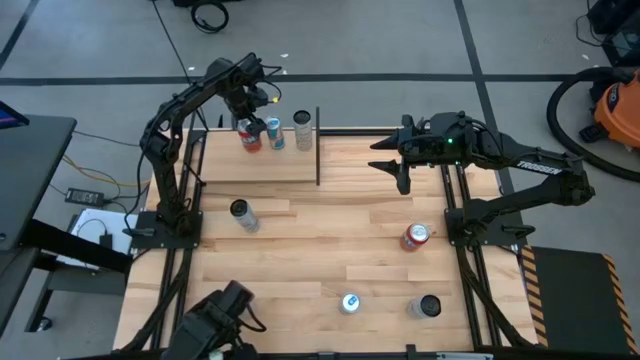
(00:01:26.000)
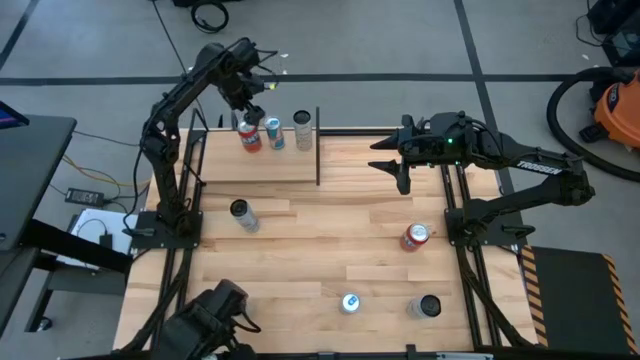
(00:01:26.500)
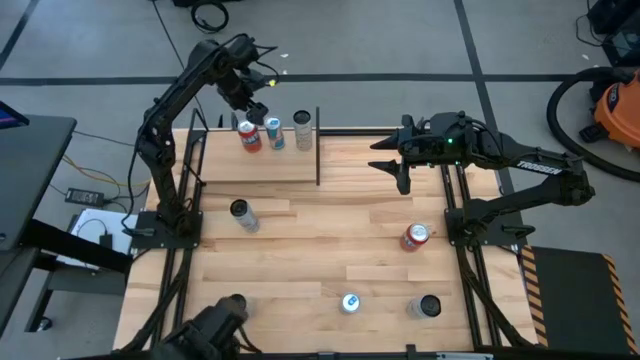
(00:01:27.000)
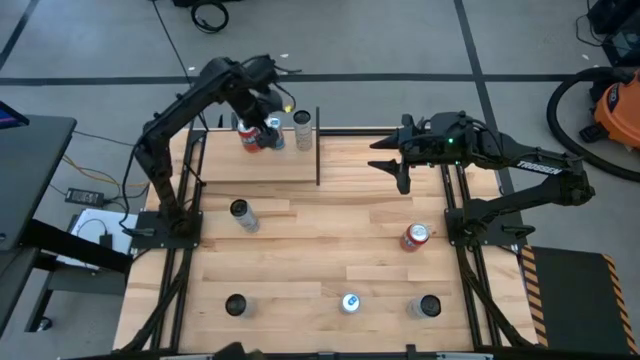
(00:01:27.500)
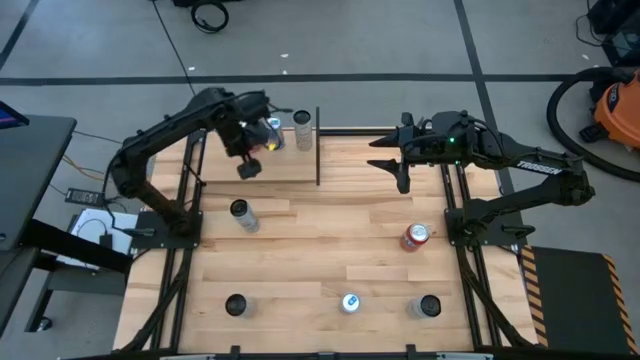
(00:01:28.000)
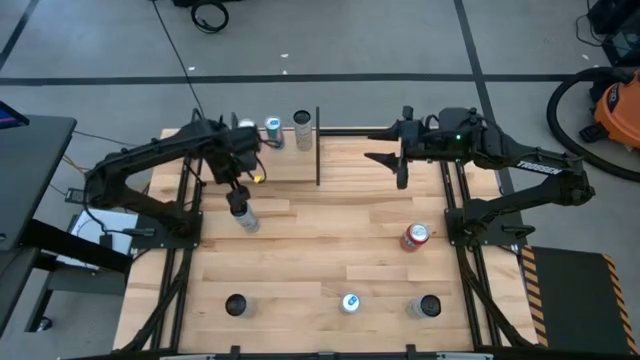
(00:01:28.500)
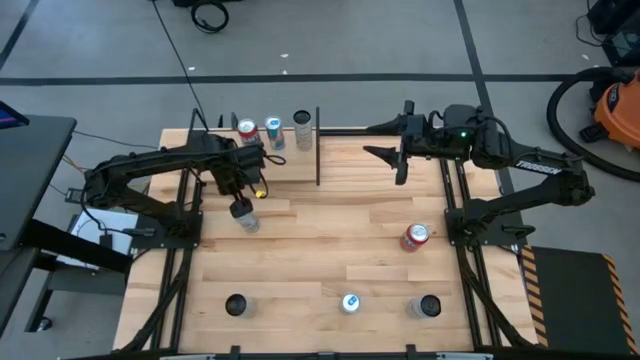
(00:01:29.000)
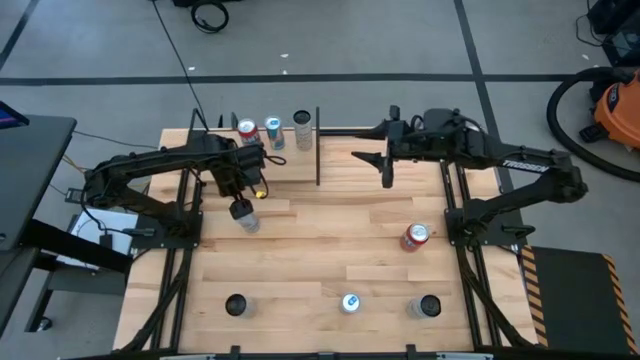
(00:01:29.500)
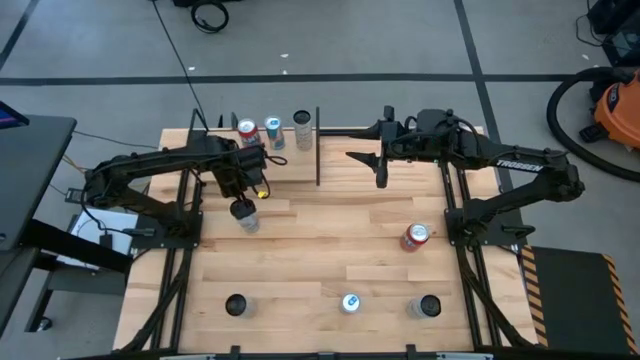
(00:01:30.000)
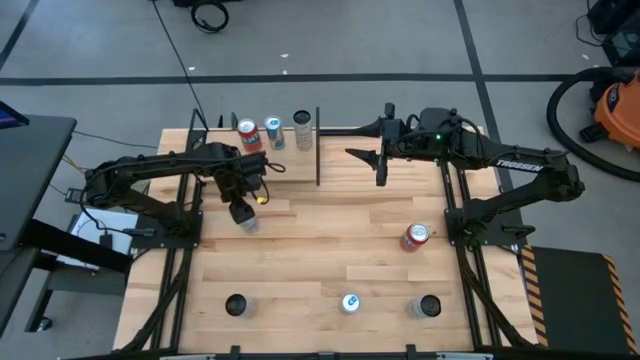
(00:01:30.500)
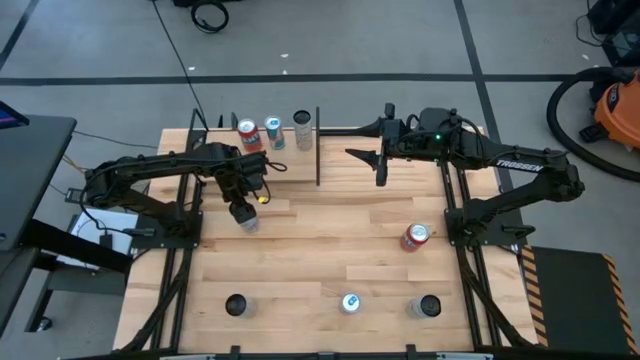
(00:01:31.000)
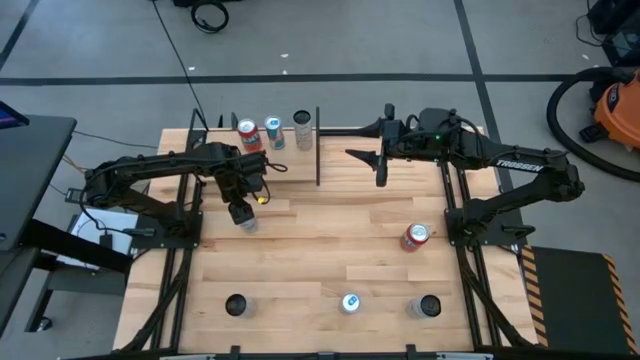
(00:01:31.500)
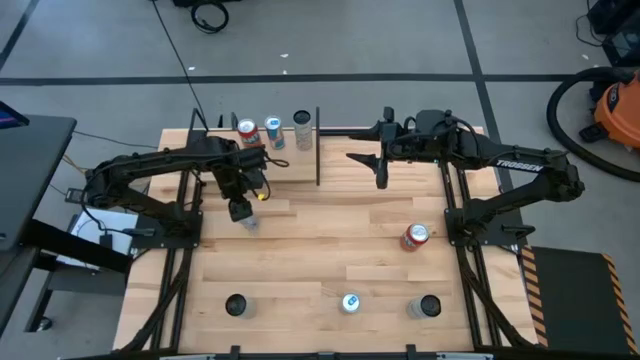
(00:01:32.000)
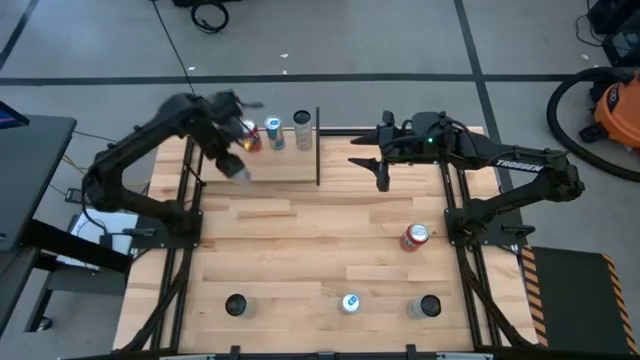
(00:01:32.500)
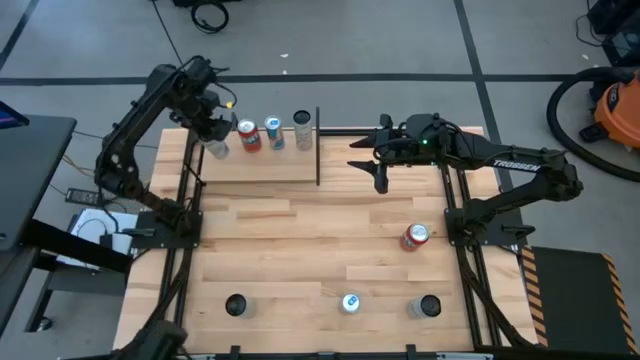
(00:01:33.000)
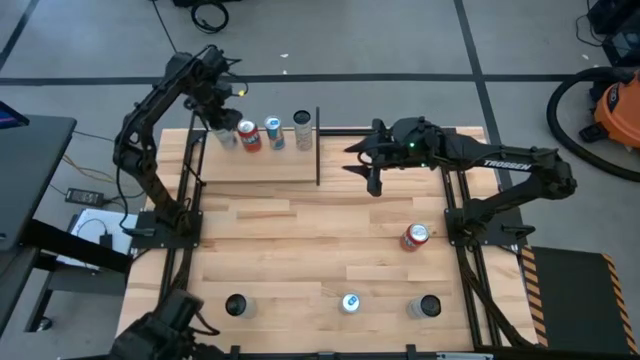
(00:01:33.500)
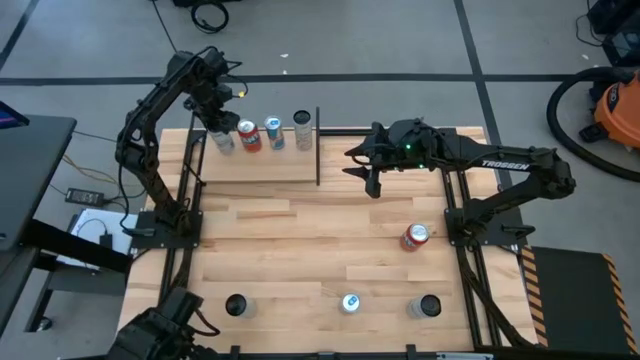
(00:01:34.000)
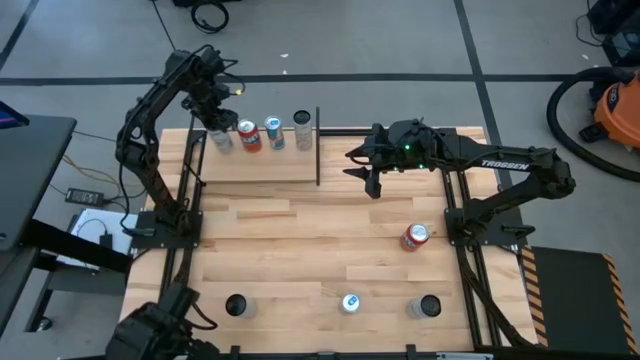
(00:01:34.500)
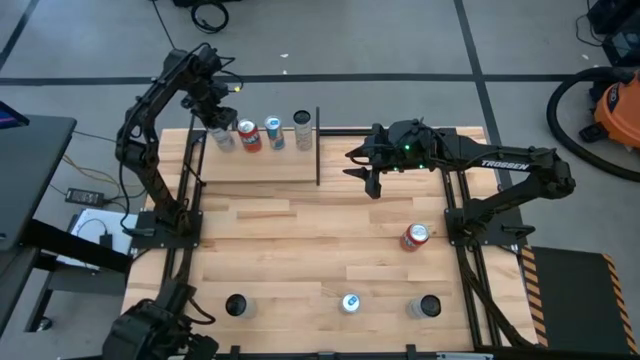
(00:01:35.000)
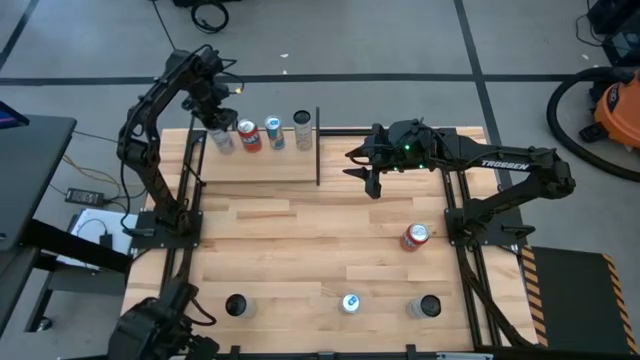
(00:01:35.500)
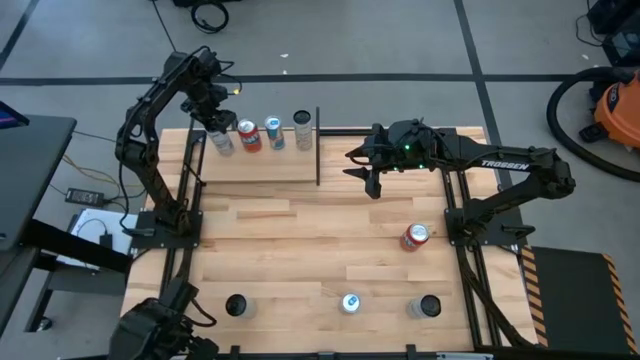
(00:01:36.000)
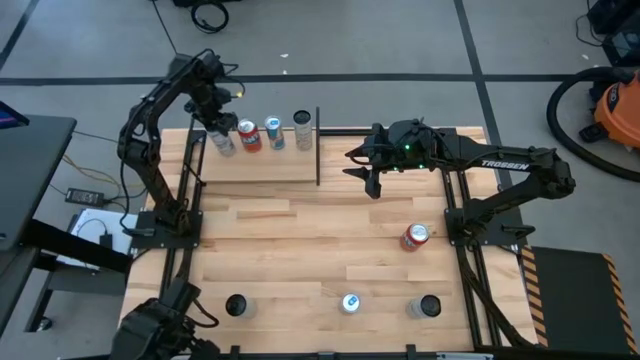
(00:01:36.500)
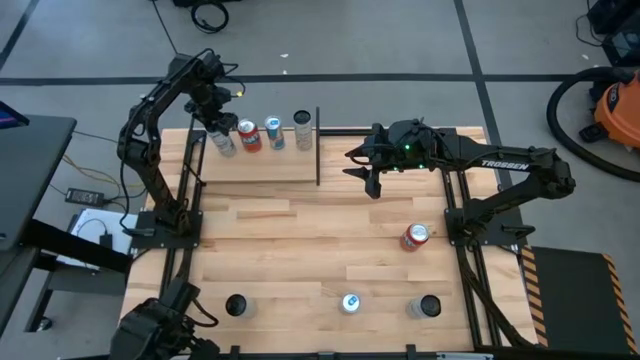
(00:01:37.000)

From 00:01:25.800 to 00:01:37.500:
Task: Place canned beverage on shelf
Put the white blue soda can on the shelf

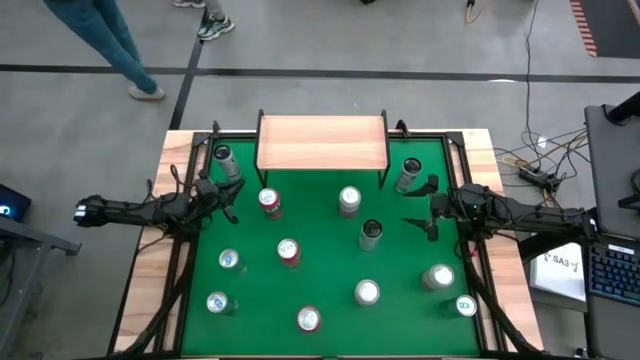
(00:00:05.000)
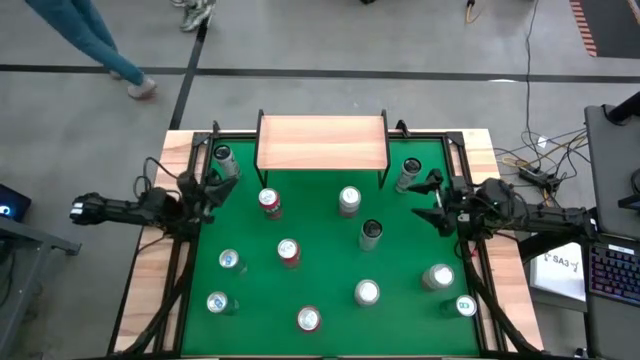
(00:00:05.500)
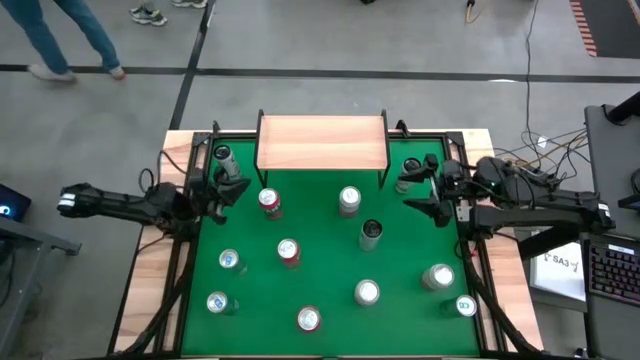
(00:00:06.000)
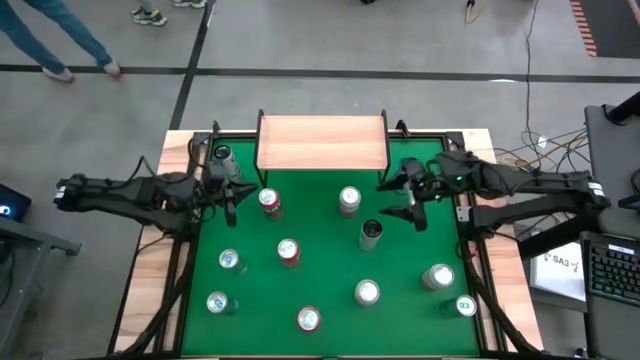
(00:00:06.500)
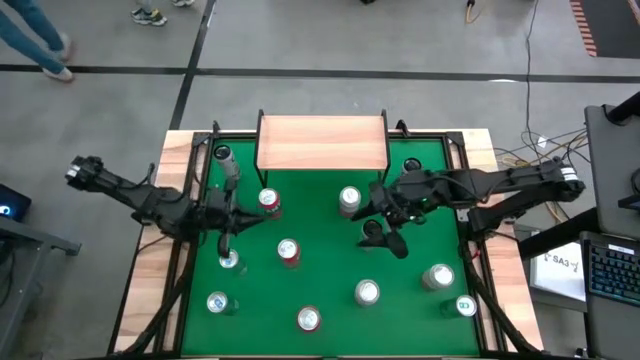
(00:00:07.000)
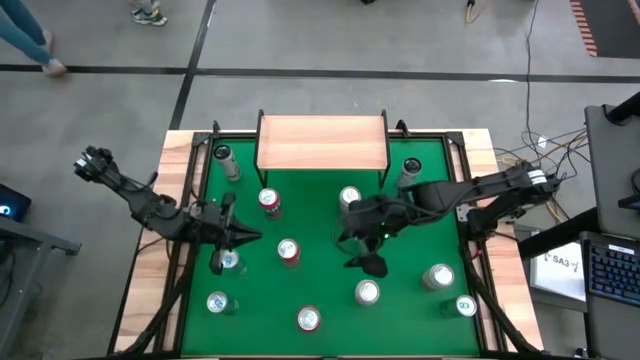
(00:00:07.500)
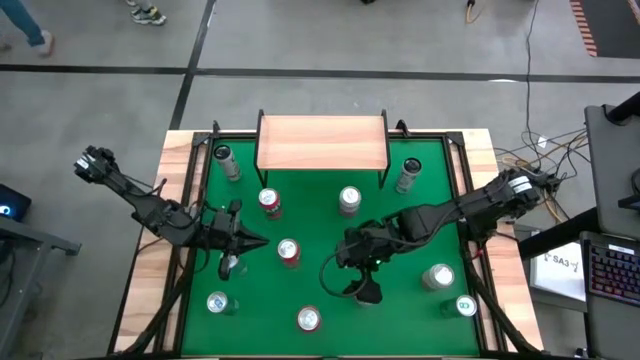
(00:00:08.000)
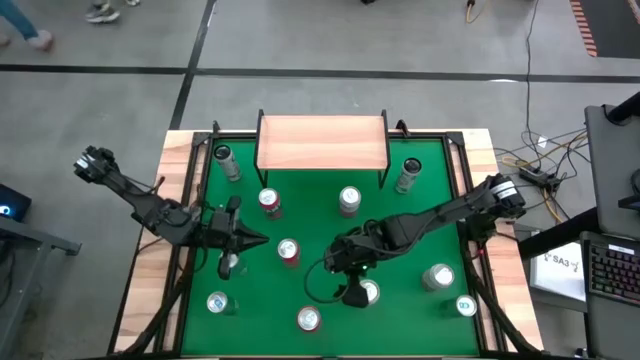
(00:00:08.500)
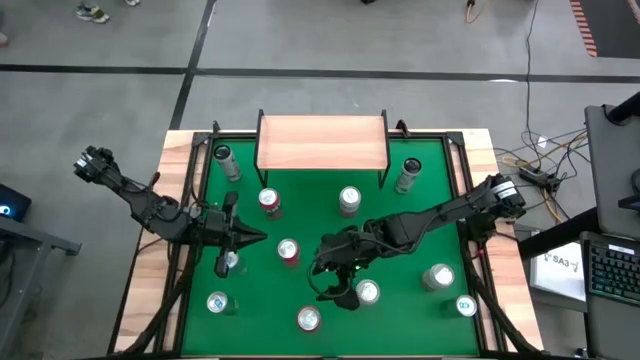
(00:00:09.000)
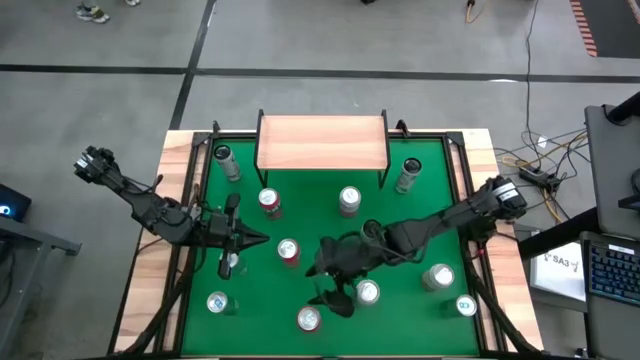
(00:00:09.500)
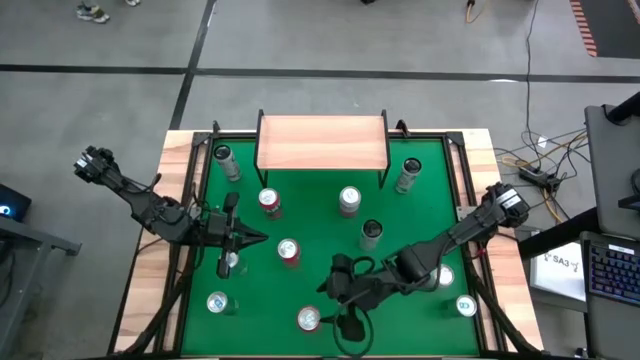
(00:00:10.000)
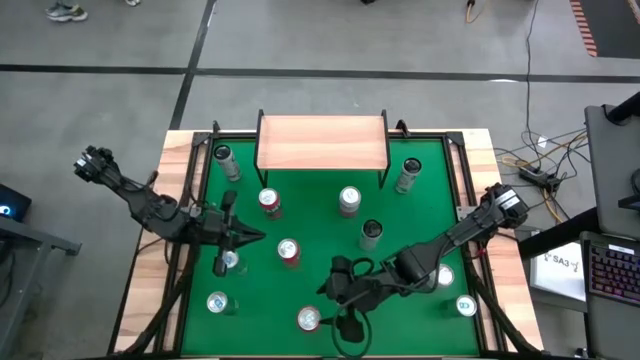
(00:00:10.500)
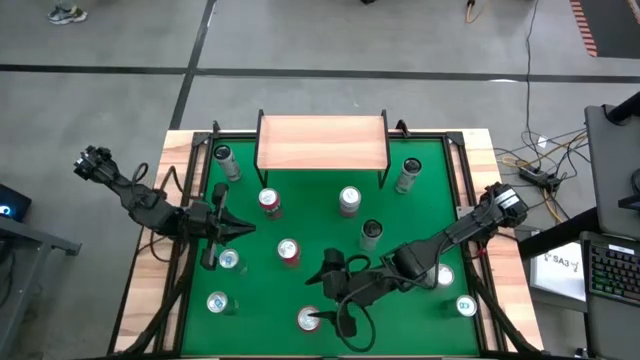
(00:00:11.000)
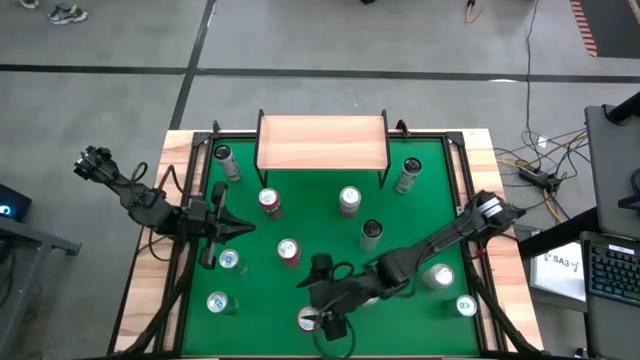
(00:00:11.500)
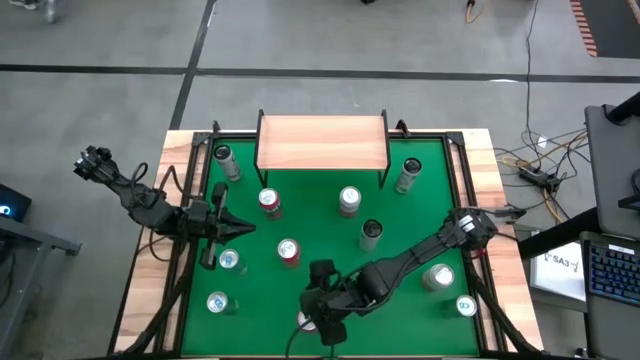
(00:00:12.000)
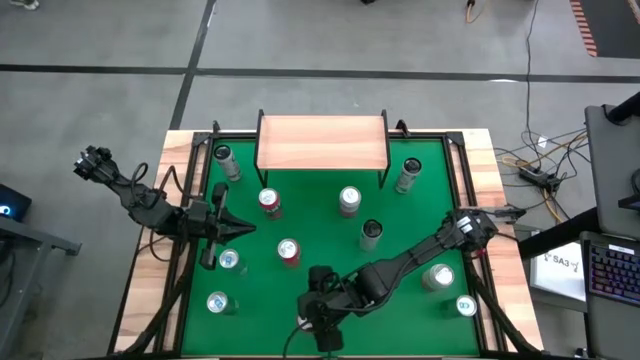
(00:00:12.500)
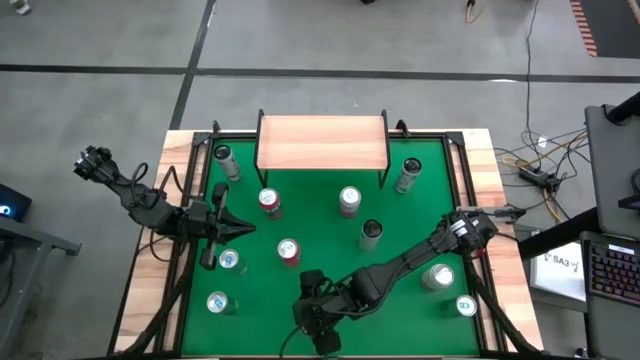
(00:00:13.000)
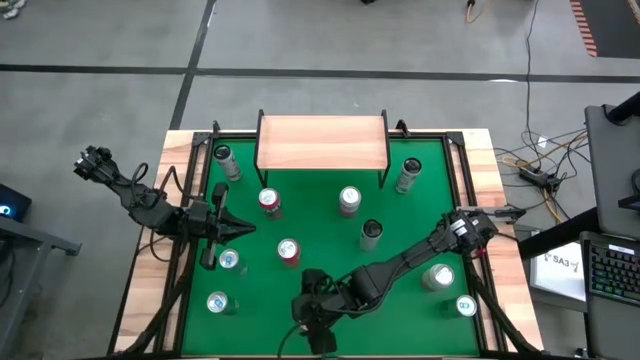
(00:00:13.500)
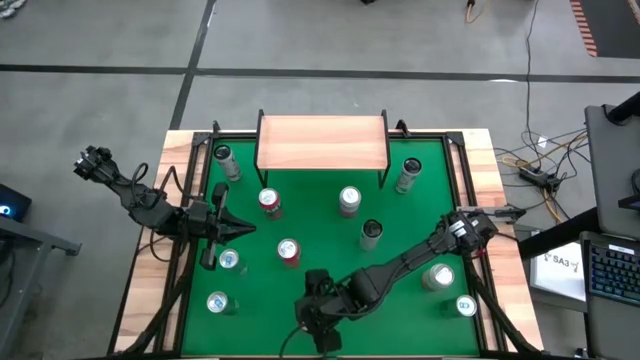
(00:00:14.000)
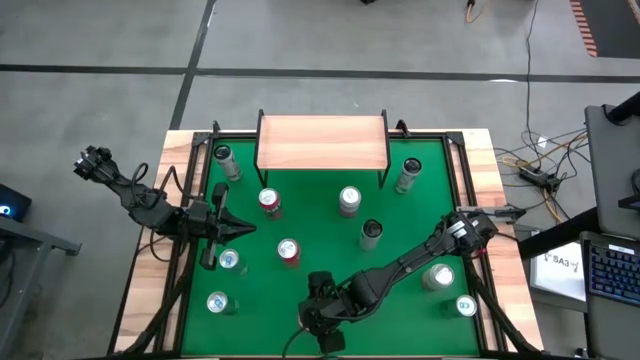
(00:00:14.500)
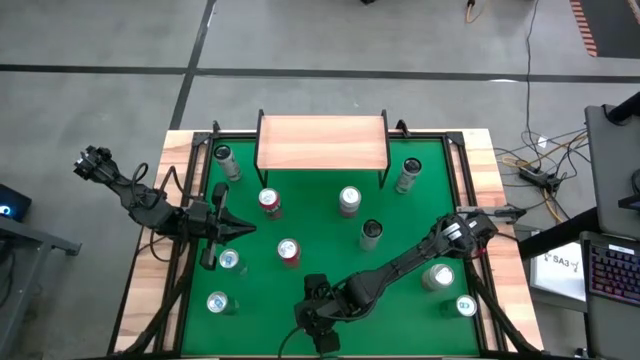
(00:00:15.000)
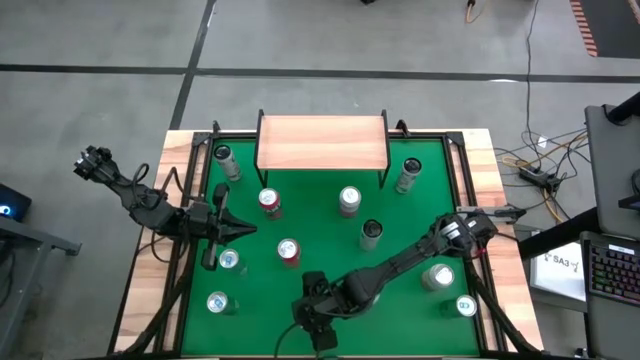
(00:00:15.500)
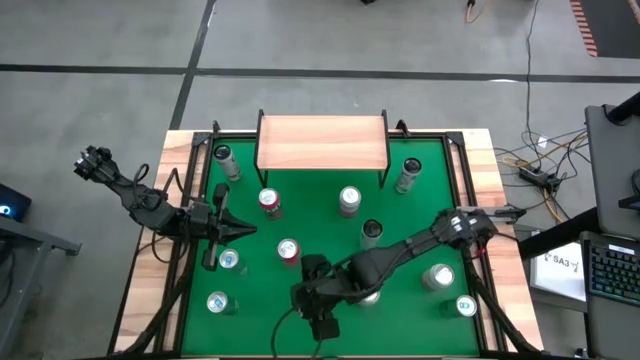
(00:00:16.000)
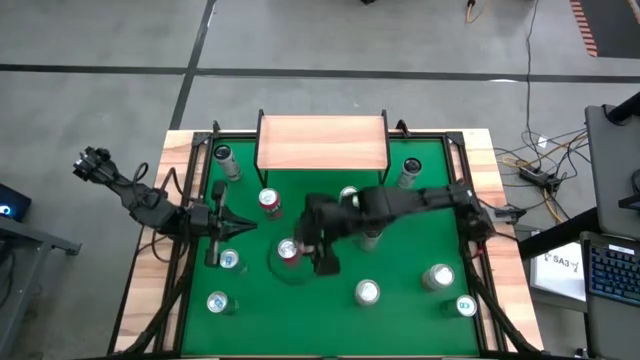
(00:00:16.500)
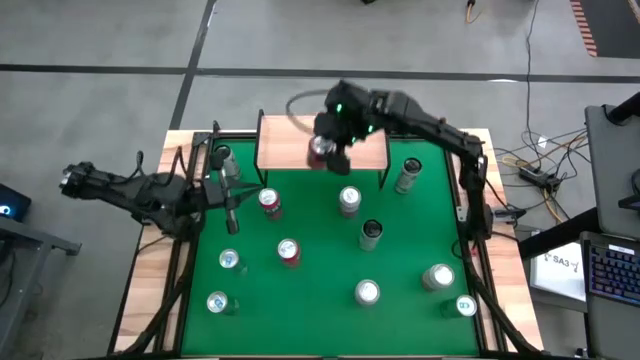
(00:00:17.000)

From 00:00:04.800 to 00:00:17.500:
Task: Place canned beverage on shelf
Put the bottom orange soda can on the shelf
